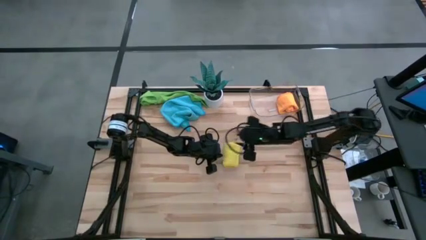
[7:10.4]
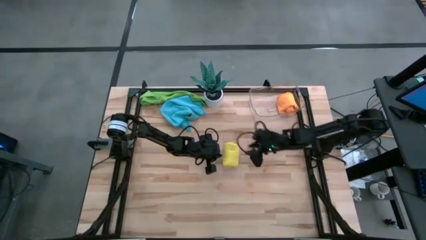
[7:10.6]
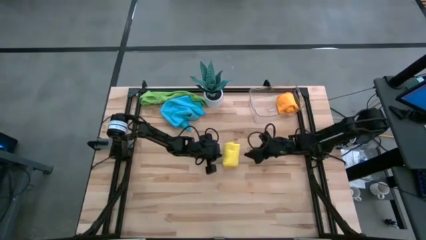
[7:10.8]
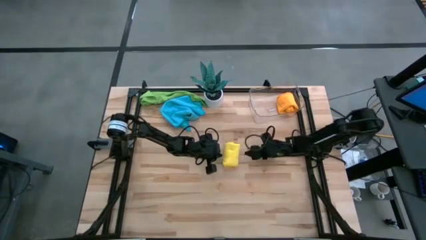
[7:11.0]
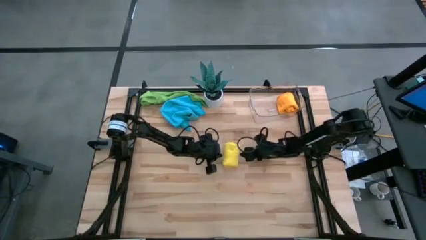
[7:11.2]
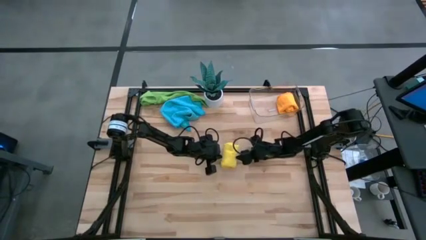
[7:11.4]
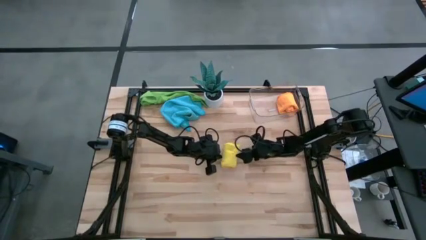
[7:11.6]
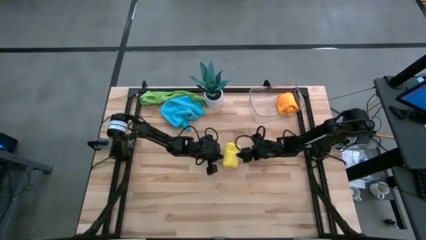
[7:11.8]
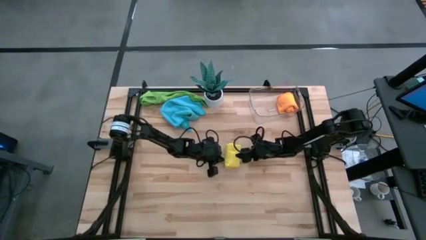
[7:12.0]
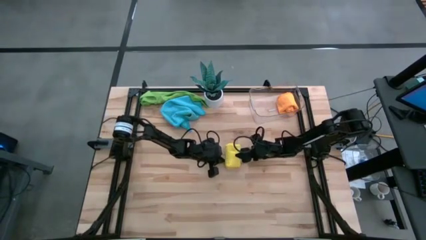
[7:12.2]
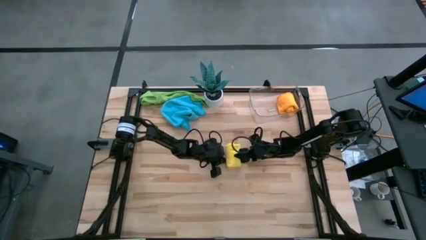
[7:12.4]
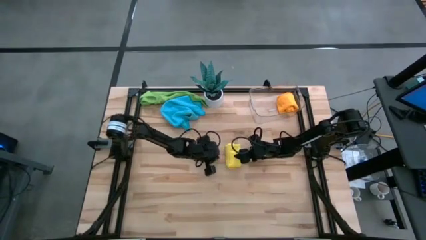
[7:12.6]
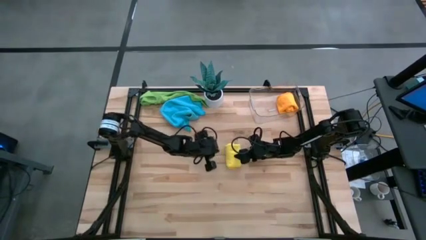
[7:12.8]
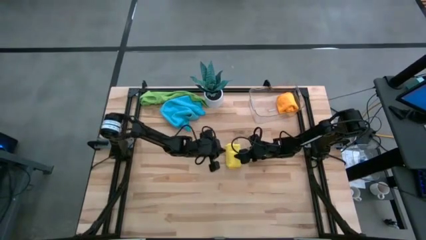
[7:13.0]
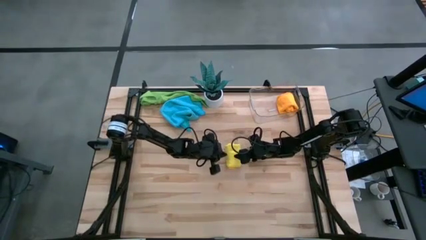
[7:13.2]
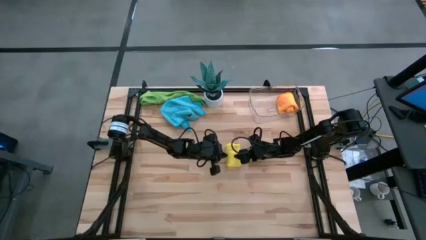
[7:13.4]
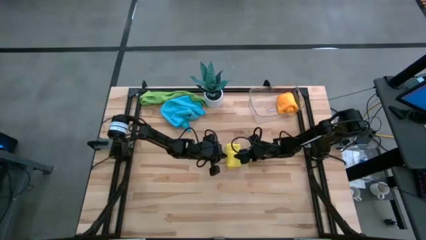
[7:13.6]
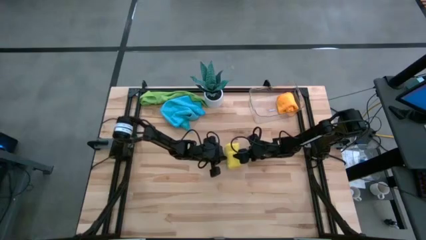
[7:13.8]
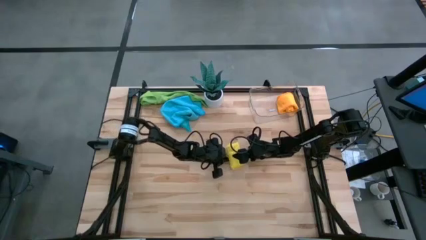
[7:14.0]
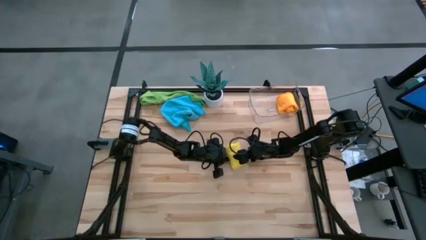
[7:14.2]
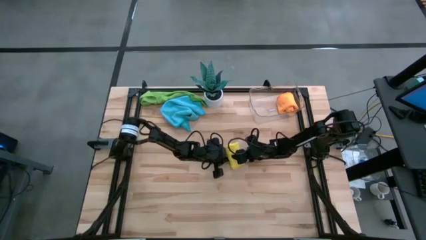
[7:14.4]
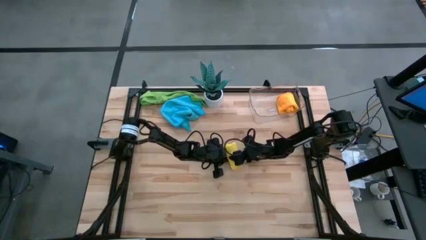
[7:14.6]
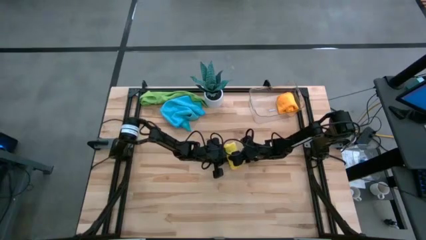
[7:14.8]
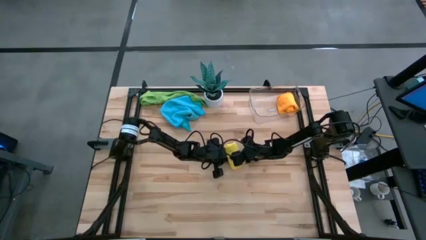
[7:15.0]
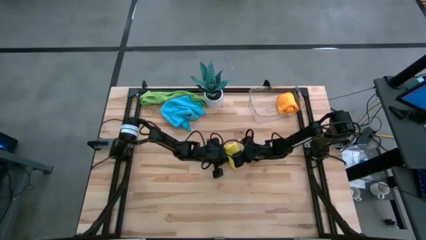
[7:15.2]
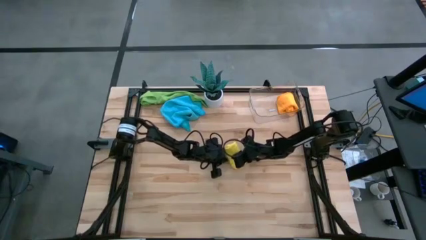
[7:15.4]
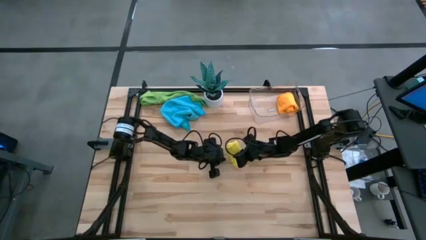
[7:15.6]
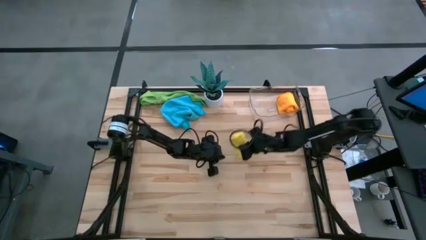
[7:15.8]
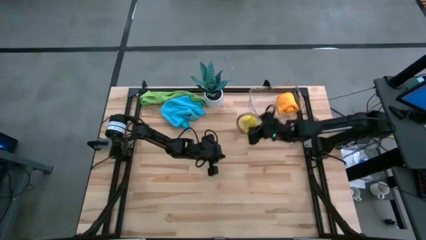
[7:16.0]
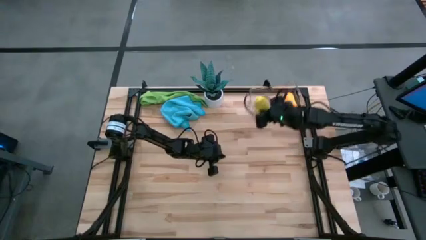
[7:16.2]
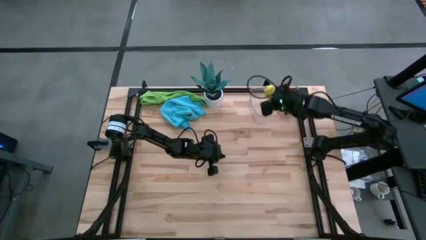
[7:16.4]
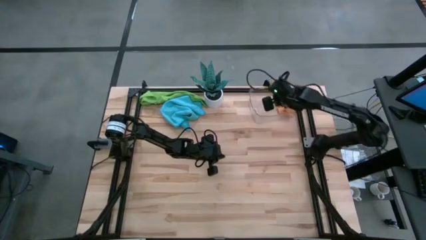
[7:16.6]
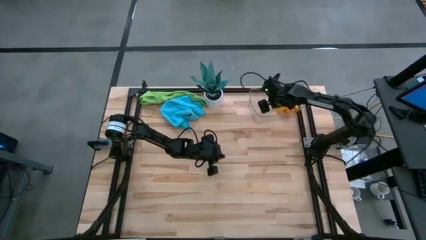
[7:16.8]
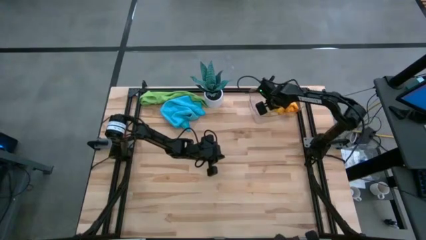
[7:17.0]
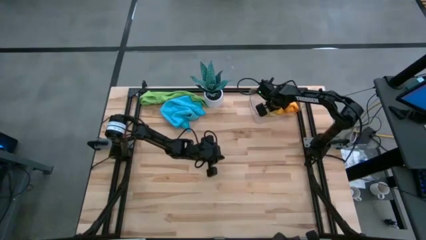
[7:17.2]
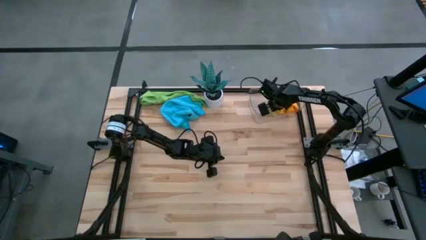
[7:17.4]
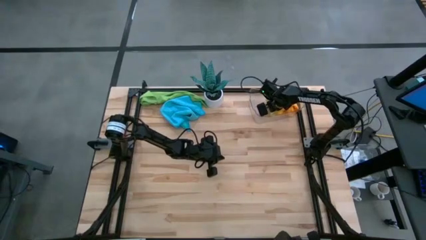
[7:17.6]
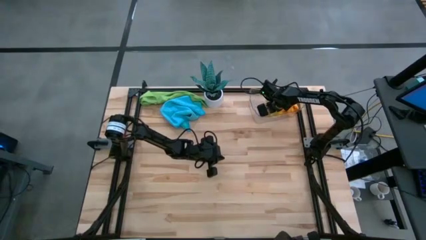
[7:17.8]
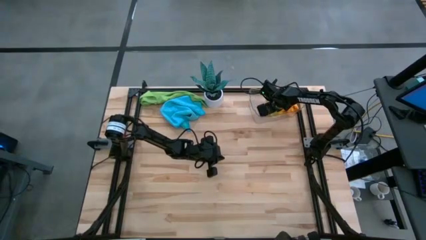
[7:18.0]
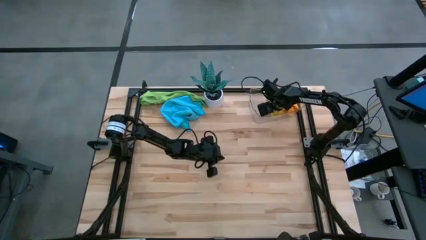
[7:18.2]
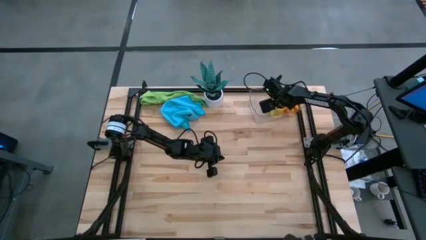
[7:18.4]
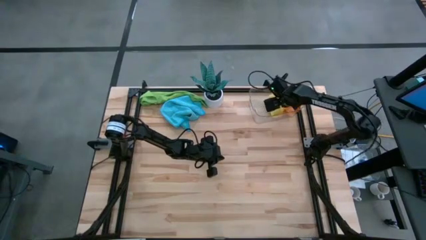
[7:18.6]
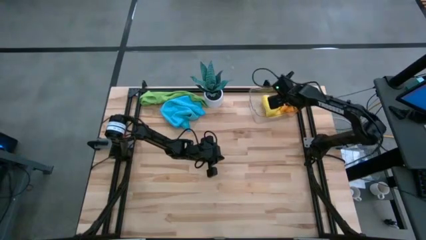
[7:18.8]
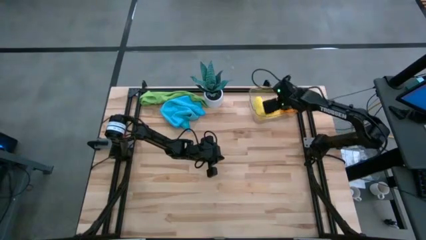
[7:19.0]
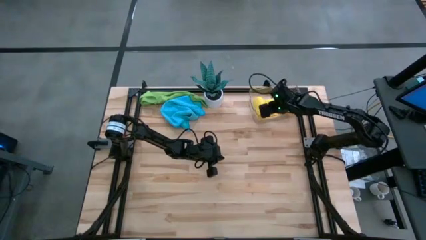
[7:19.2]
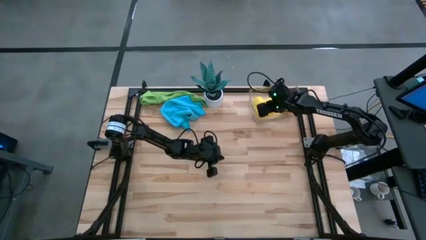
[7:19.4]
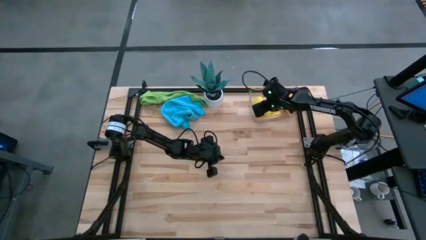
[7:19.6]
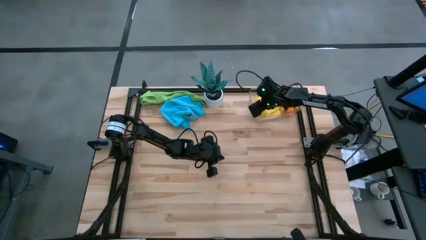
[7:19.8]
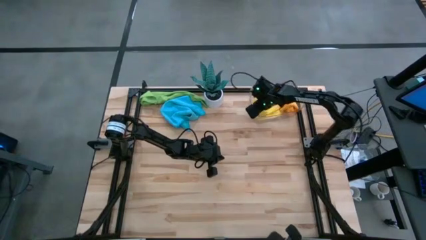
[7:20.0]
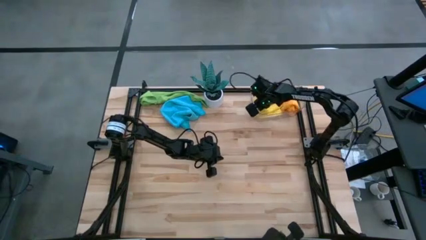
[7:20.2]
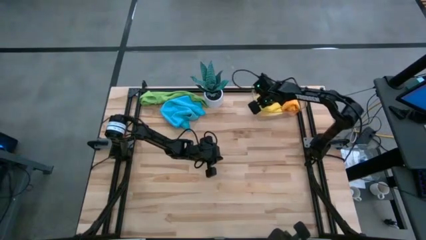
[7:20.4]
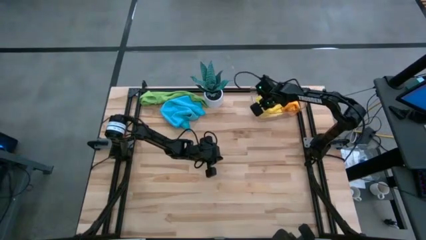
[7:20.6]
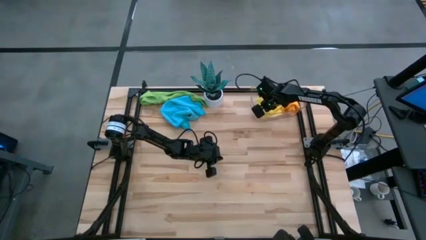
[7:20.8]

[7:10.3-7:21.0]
Task: Roll microfiber towels into tight, uniform cylinder then place into a basket
Put the yellow microfiber cloth into the transparent bin

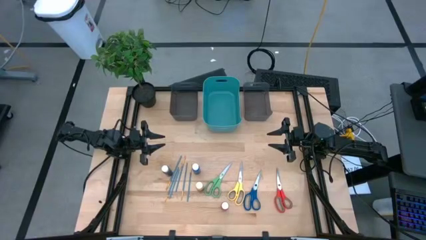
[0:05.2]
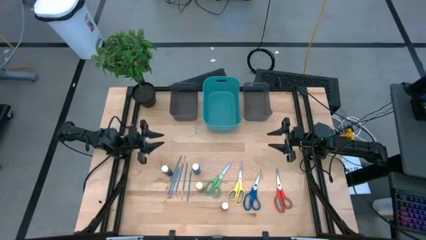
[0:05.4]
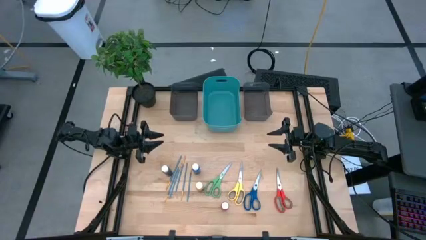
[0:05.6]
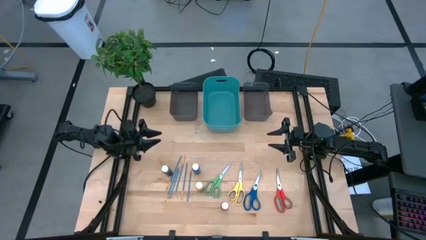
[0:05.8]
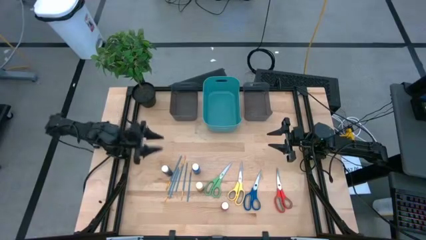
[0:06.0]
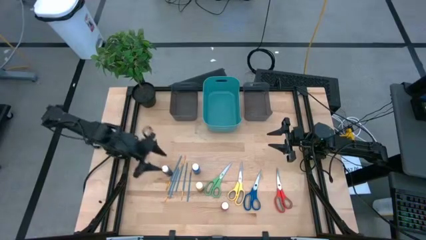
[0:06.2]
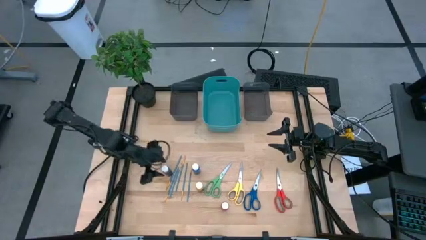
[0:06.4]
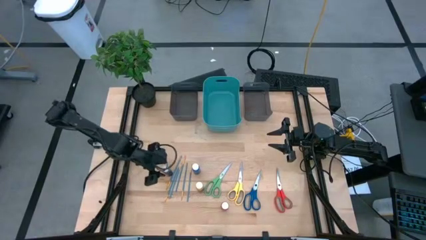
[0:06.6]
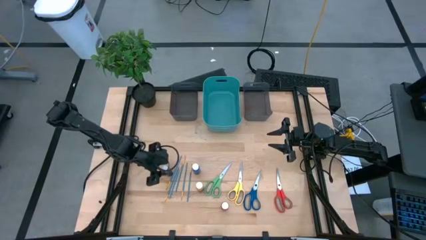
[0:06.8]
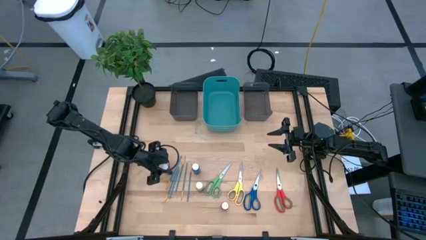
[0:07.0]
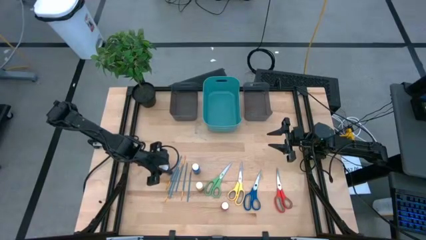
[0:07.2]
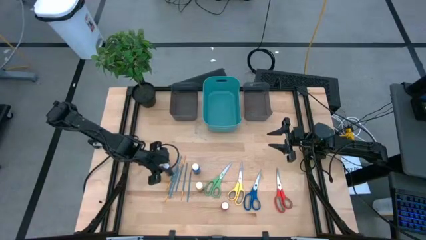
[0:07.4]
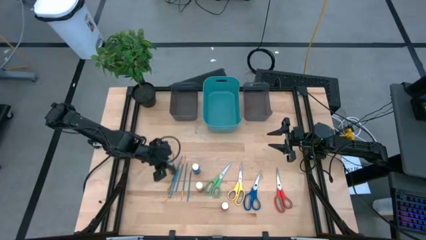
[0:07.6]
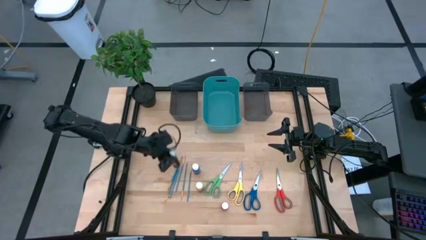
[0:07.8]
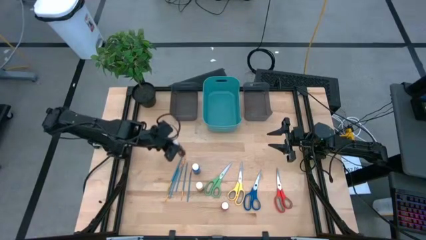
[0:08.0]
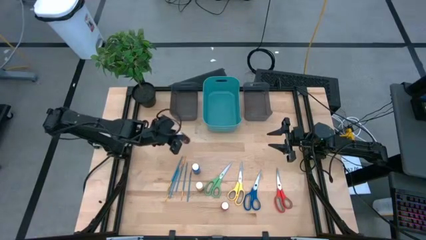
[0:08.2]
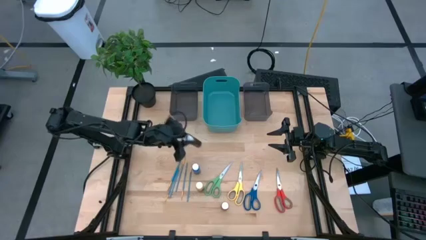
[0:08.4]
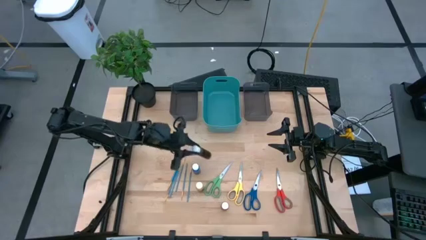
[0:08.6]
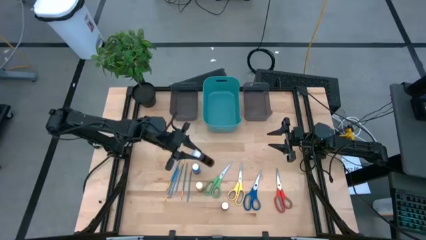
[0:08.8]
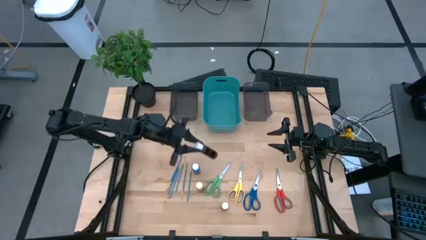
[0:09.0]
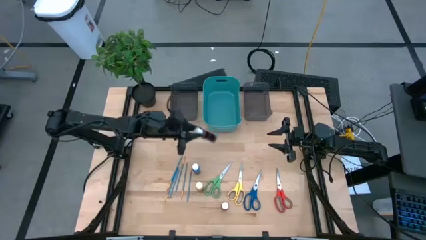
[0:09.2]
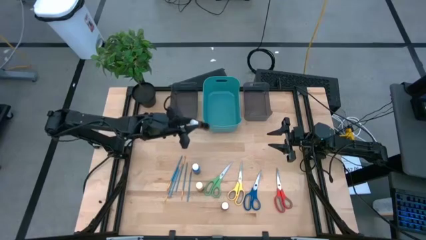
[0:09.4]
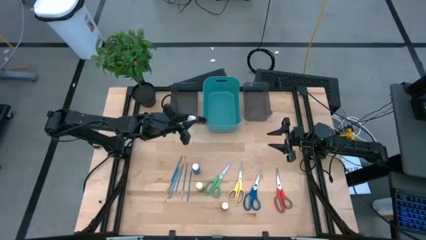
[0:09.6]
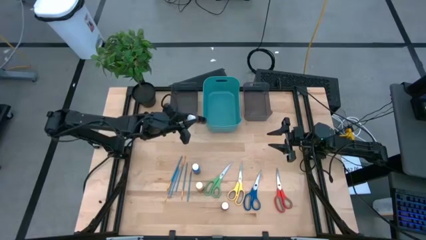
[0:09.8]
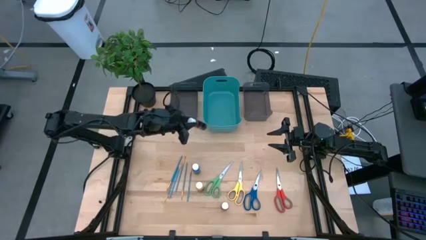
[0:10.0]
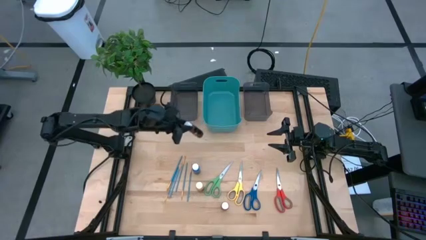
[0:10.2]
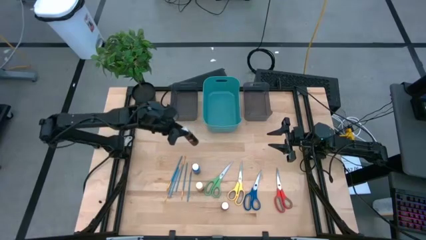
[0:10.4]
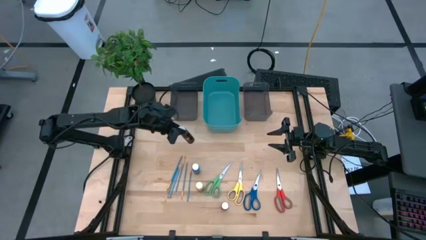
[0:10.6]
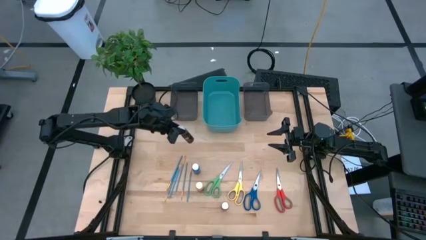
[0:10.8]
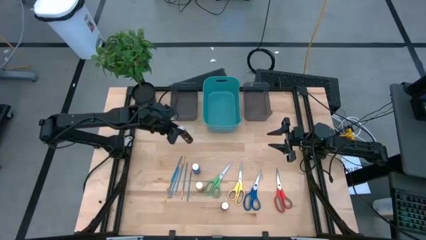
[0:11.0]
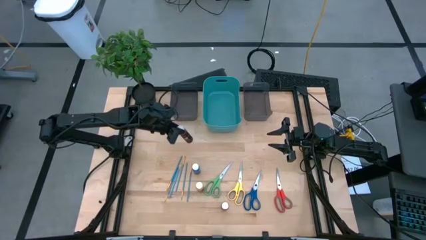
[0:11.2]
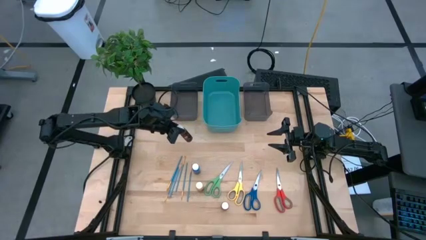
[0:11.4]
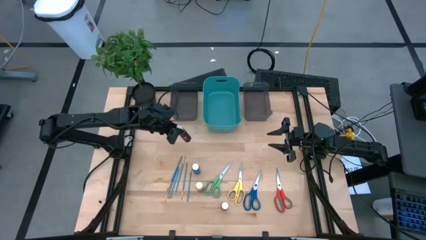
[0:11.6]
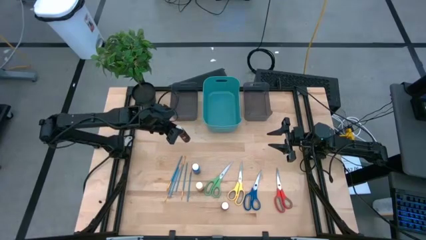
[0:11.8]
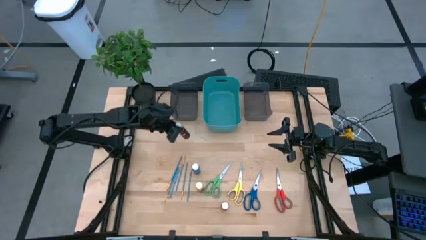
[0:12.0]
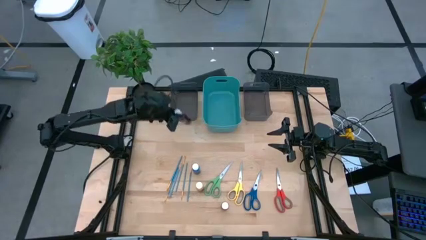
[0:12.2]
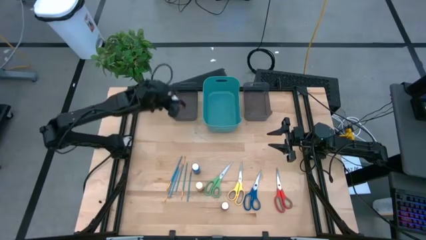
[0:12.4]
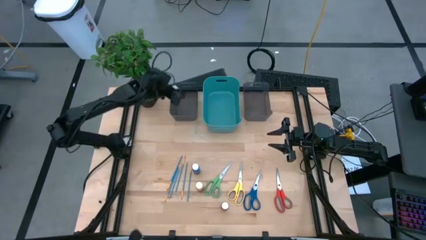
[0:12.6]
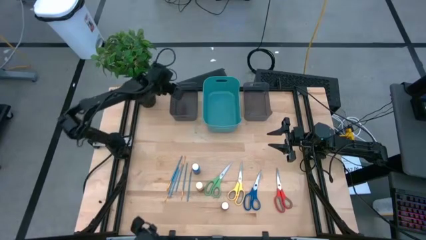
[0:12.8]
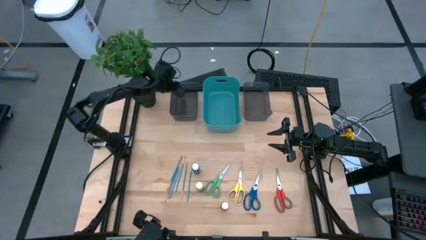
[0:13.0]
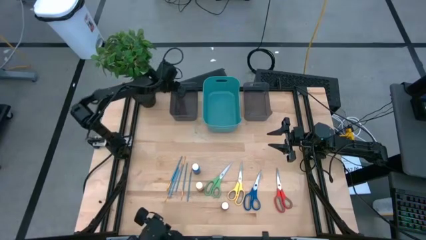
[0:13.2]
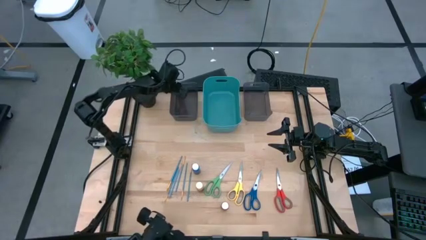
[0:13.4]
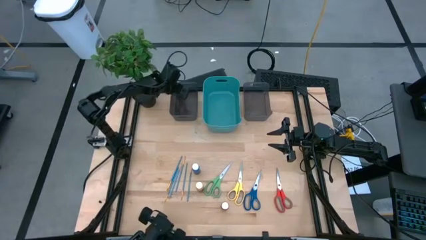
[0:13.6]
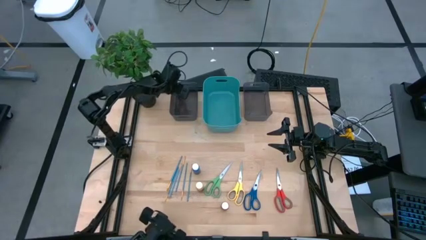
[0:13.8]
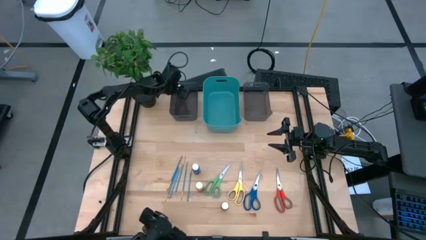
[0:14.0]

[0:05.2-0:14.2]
Task: Pick & Place Paint Supplies
Put the brown paint bottle into the left black bin
